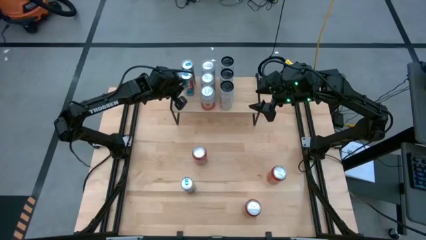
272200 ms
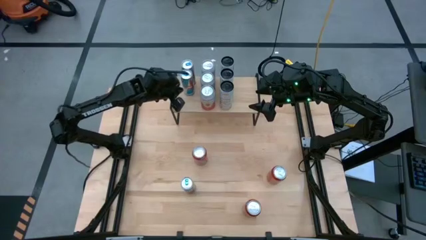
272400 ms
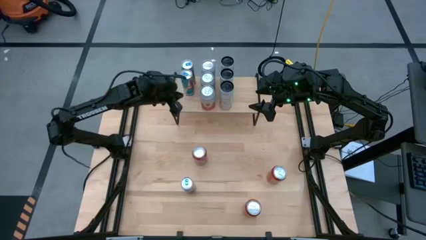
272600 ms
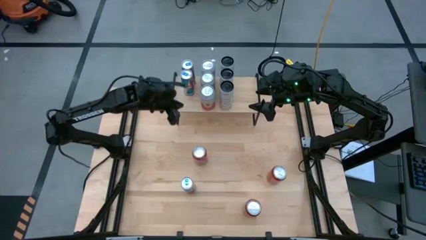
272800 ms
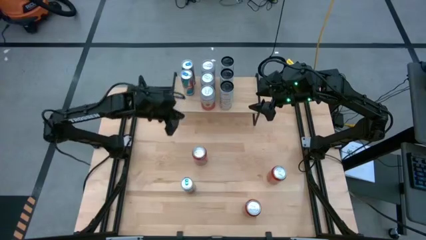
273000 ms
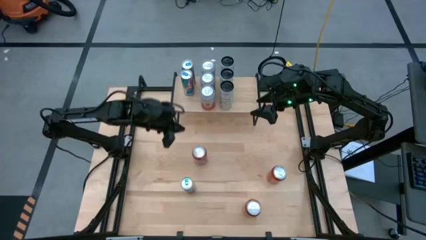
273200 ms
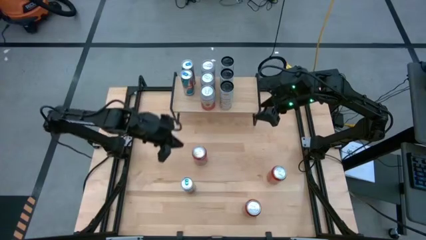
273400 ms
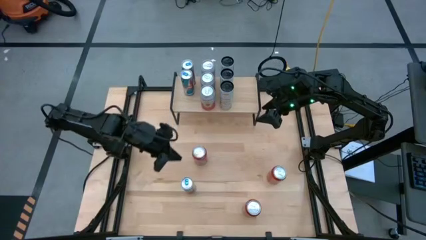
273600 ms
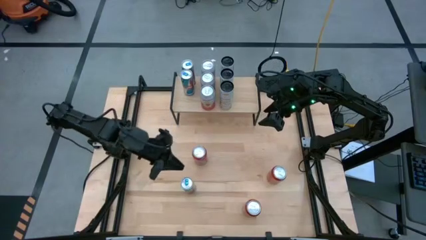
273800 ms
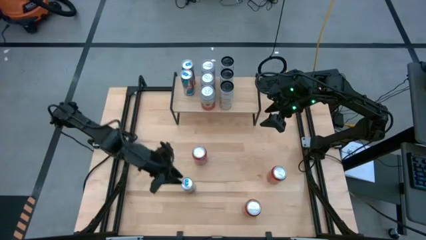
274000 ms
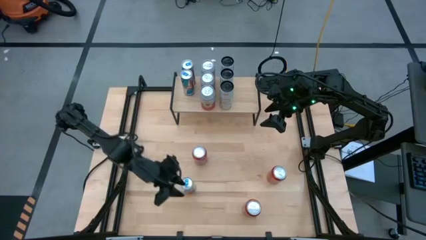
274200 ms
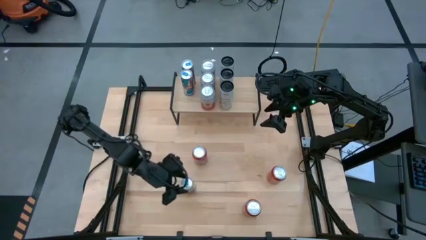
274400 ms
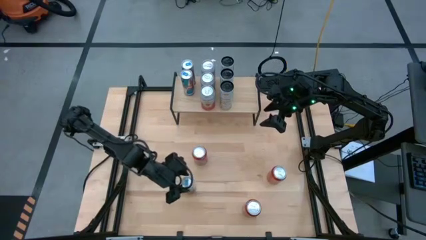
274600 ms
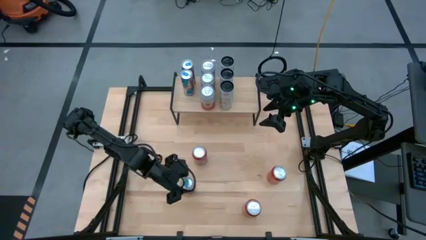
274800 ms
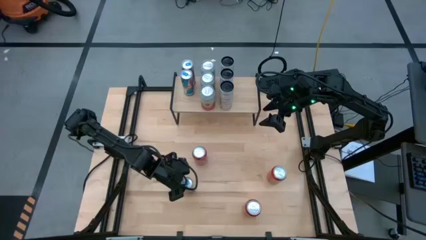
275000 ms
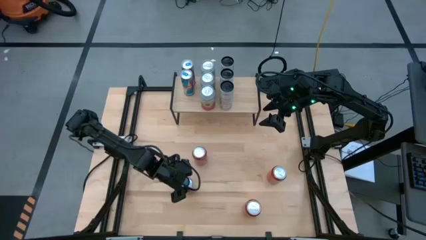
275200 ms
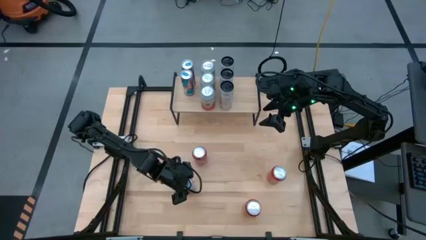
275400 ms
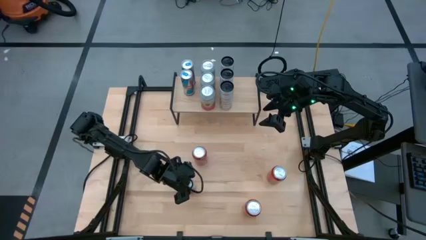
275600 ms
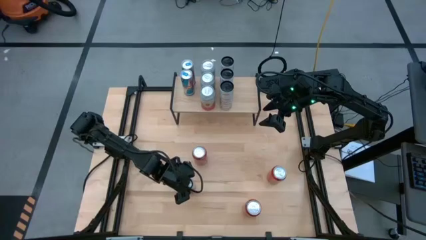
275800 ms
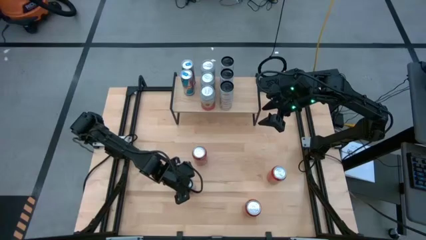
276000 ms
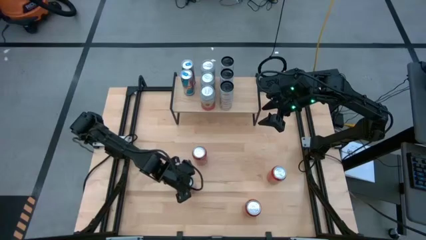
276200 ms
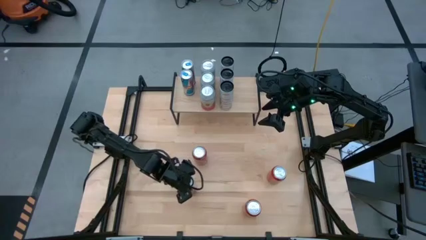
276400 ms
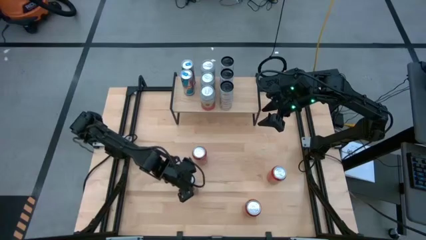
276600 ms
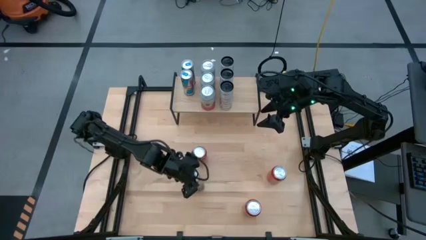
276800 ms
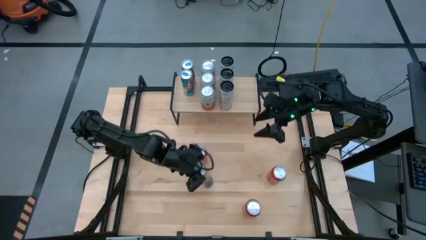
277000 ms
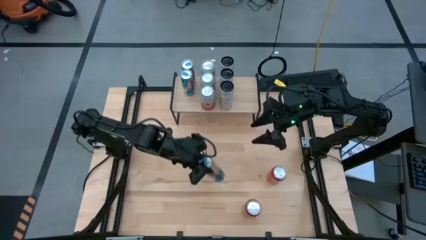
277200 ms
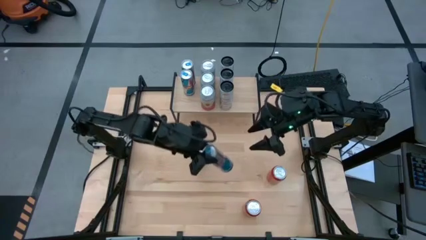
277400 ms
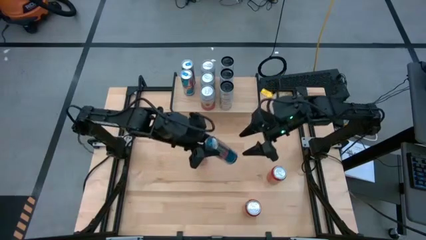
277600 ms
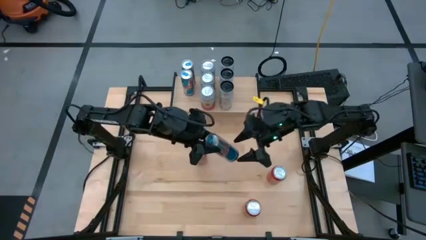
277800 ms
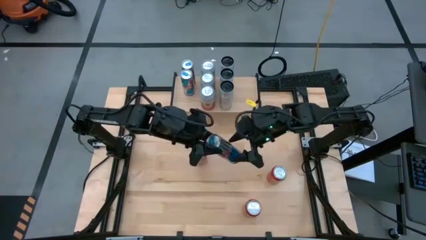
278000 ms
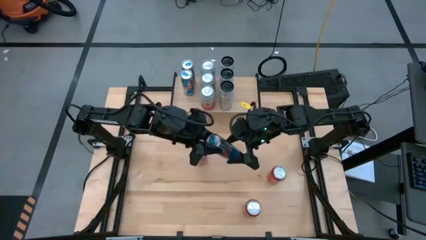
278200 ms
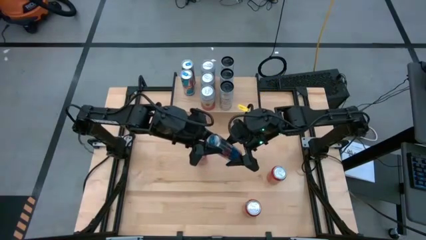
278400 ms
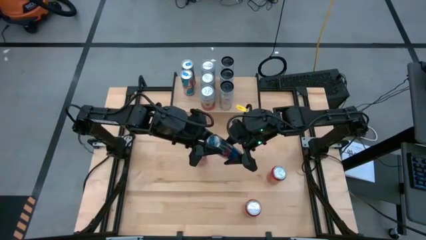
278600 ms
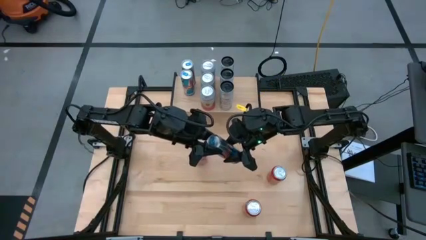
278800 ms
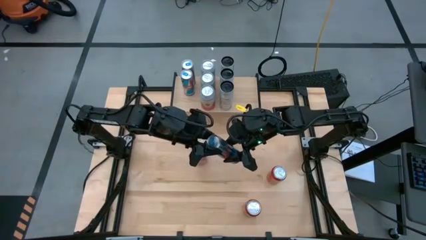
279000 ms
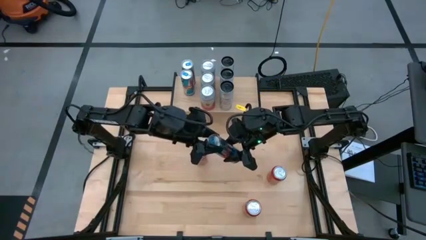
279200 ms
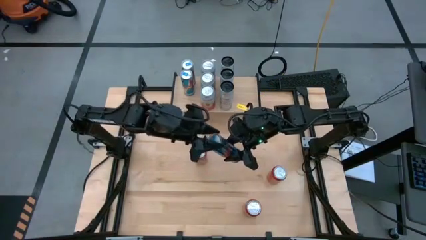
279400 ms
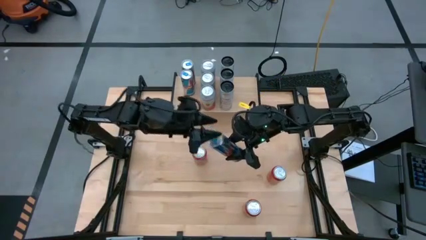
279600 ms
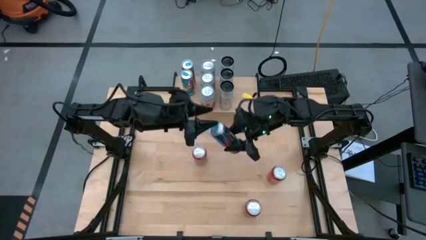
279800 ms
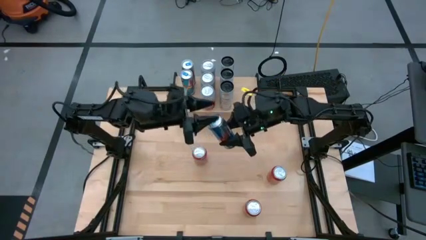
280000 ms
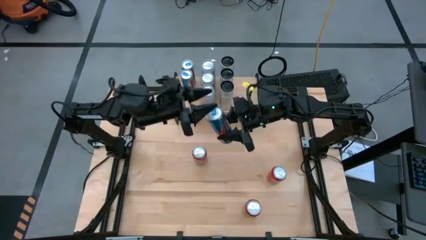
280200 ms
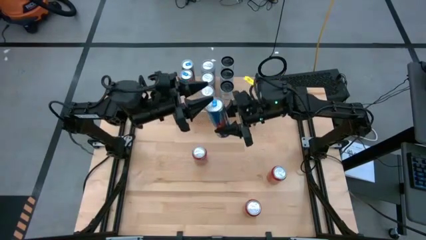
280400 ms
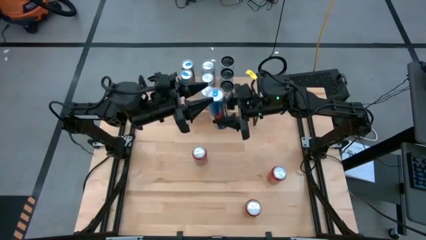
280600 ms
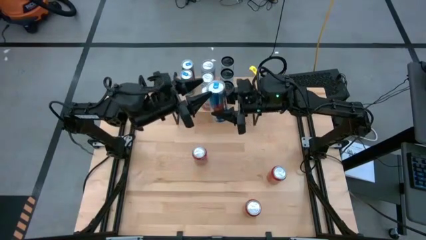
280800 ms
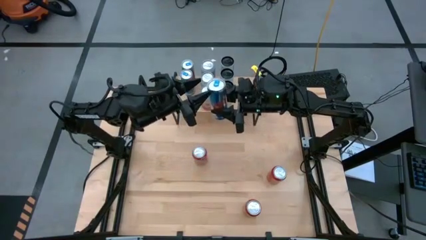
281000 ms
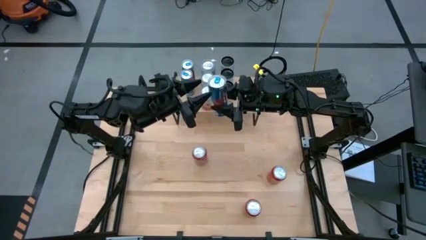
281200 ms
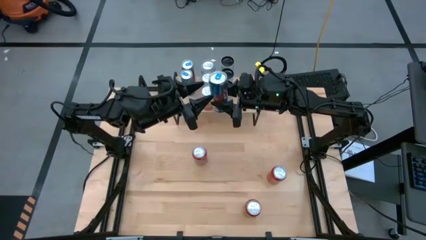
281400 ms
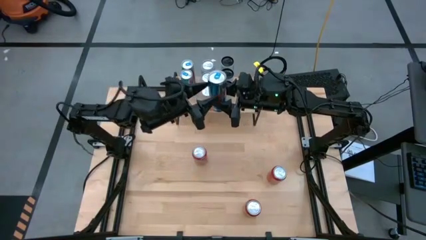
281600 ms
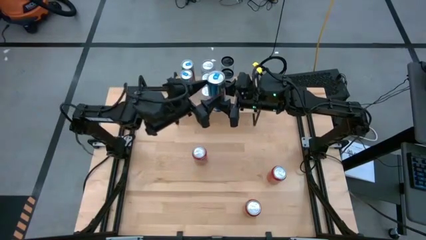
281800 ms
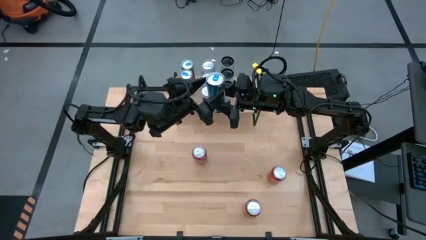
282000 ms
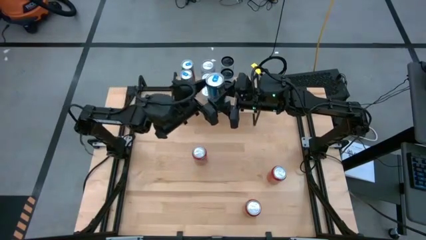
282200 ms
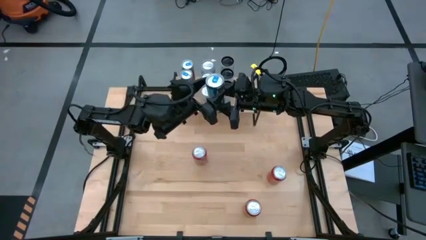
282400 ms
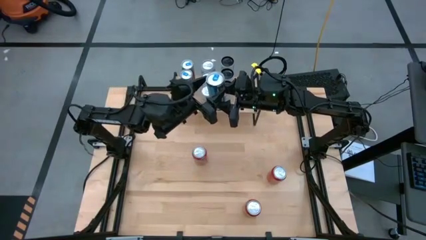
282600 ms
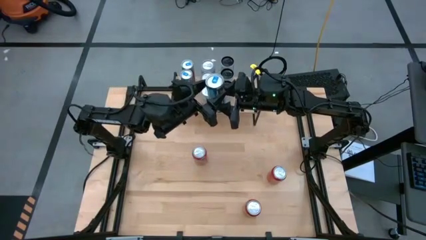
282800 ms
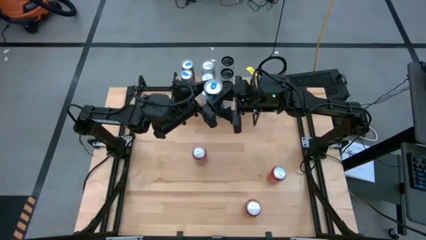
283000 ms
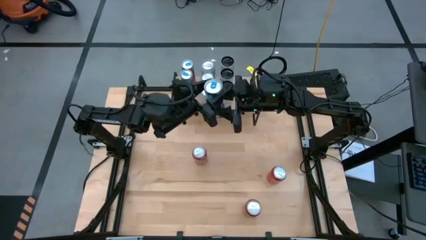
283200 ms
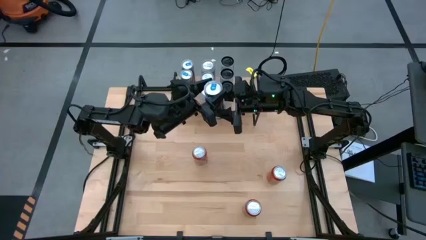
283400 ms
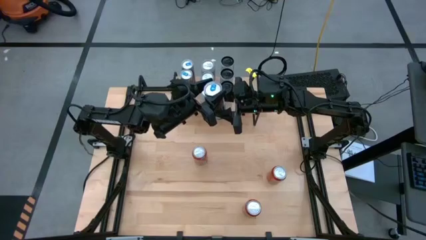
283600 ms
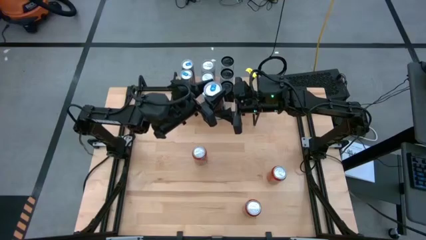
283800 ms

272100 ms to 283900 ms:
Task: Place canned beverage on shelf
Put the blue soda can aligned with the other blue soda can on the shelf
